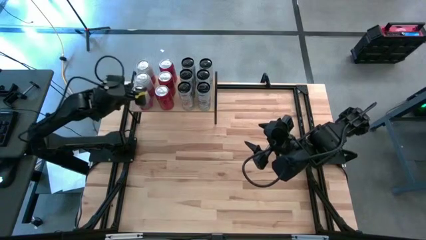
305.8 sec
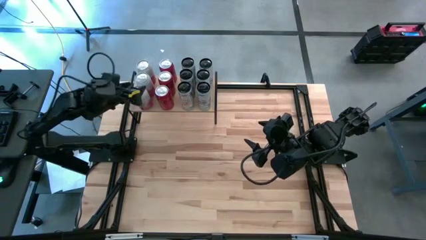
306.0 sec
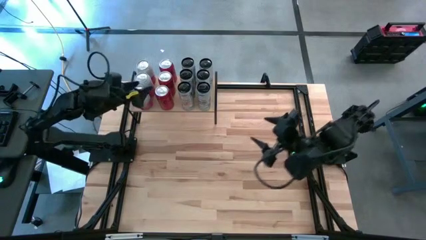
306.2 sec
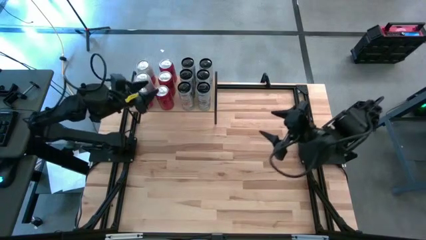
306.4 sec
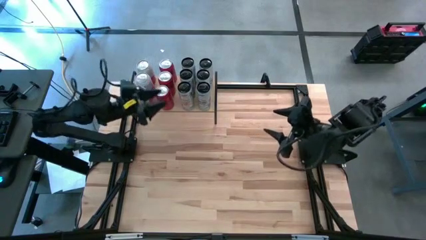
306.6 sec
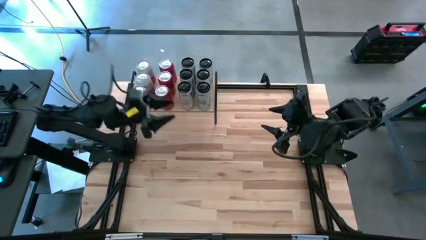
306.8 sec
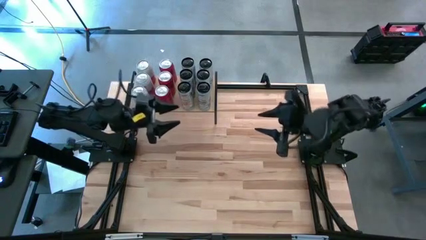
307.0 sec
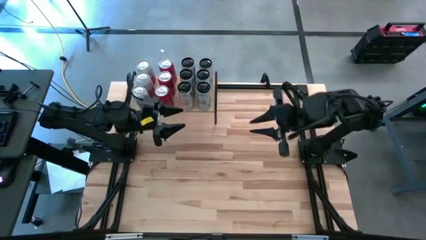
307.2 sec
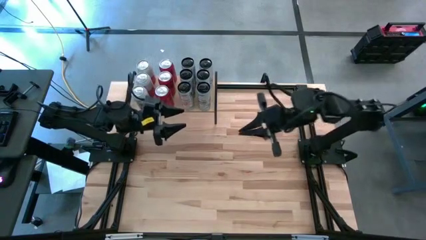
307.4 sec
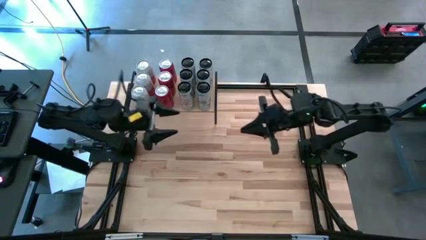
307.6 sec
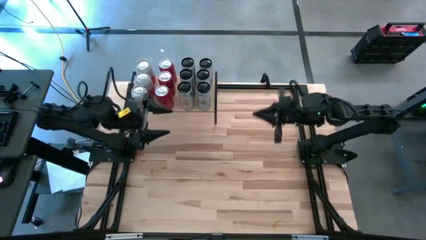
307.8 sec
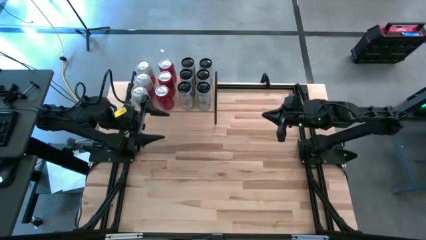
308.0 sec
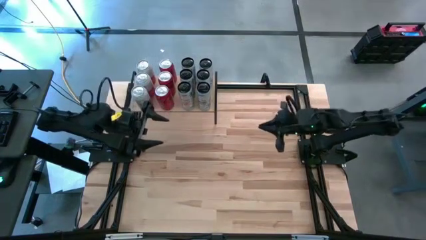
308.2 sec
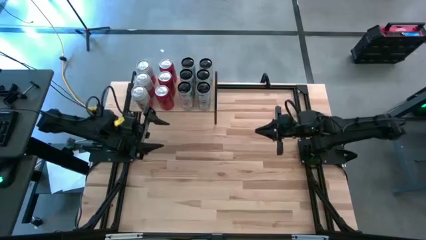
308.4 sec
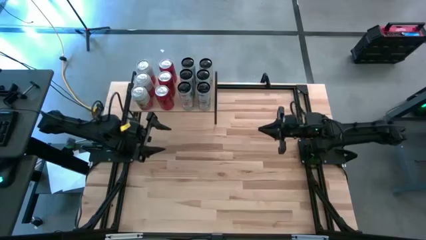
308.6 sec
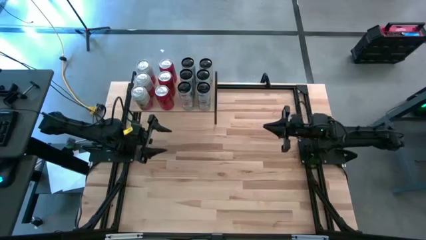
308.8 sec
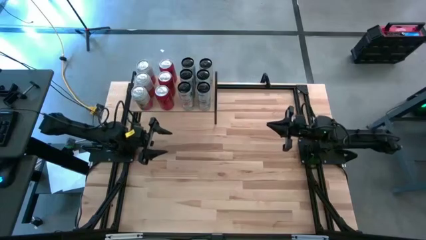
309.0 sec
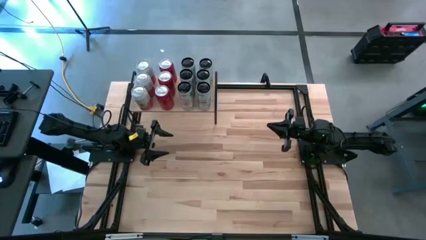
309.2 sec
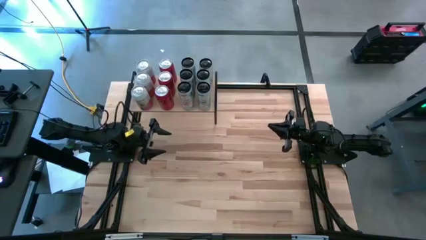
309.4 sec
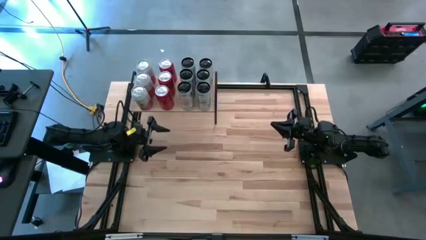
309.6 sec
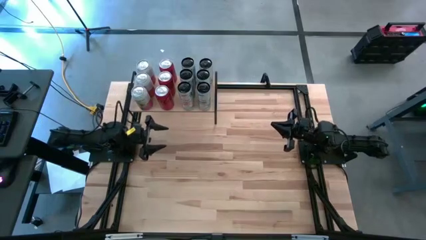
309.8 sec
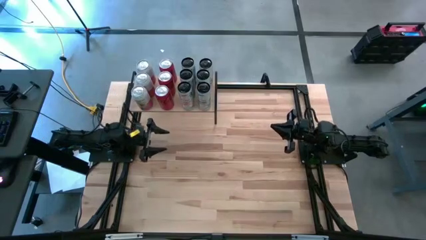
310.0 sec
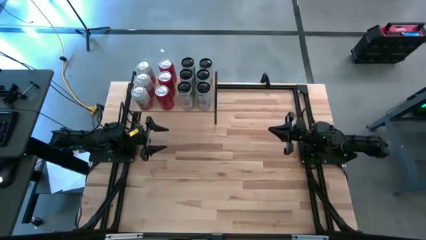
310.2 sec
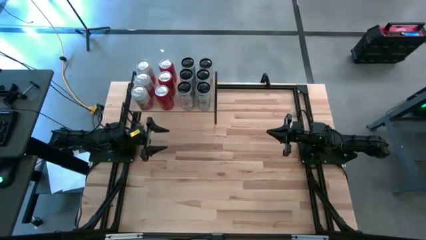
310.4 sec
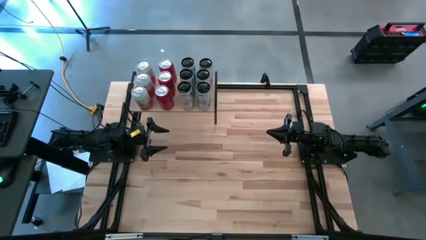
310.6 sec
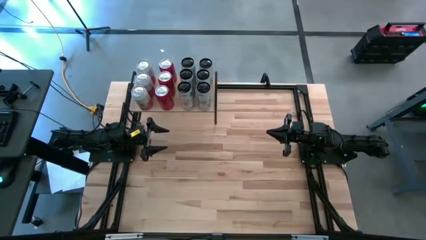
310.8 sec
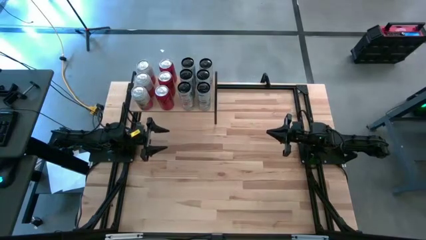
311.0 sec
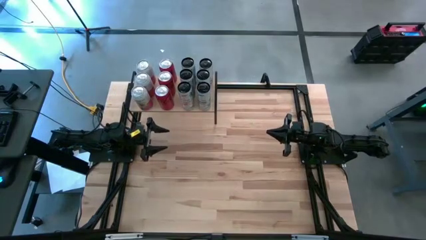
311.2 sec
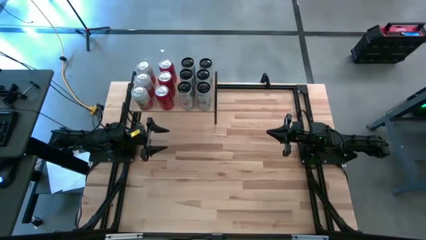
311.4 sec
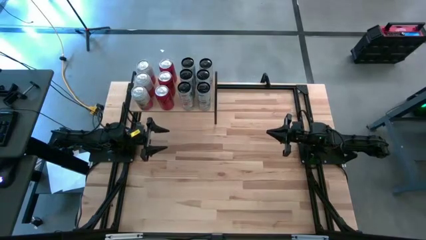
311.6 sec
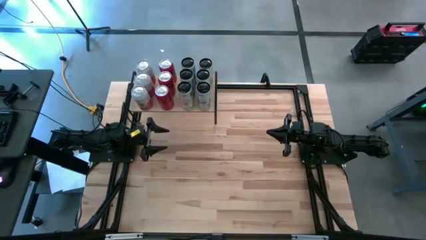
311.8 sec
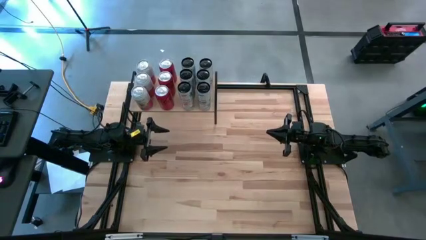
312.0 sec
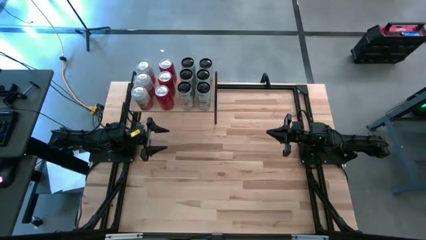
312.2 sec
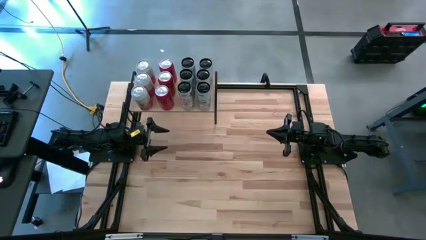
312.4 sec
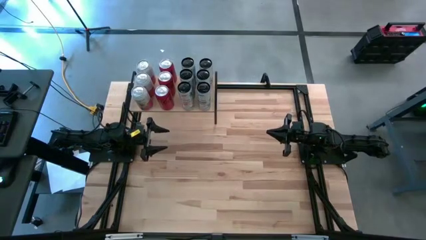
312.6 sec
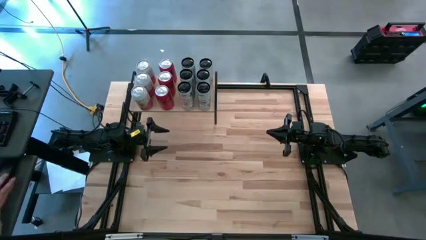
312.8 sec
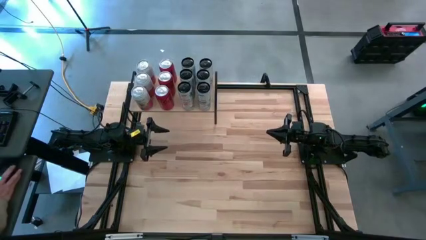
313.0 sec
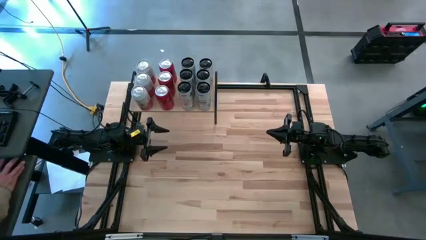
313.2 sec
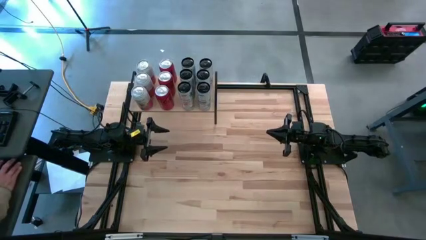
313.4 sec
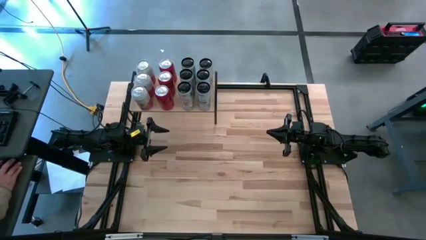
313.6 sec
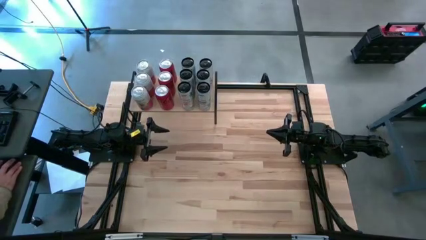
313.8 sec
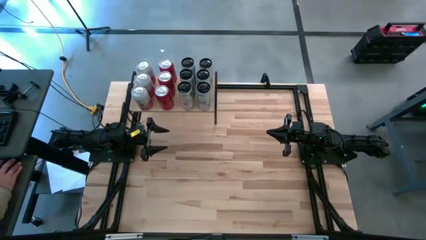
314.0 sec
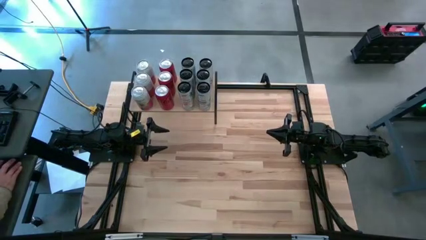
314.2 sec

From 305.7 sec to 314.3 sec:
Task: Place canned beverage on shelf
Return to Home Position

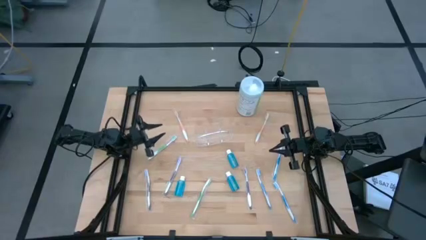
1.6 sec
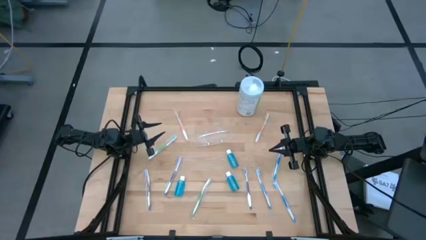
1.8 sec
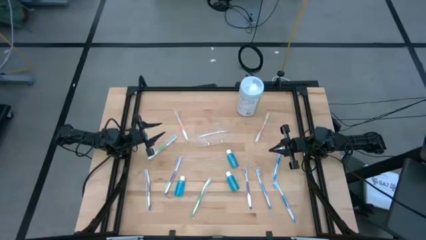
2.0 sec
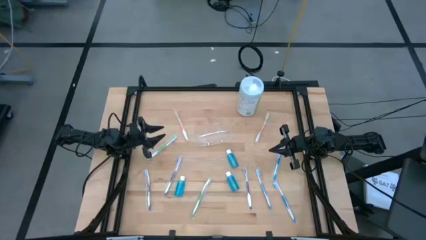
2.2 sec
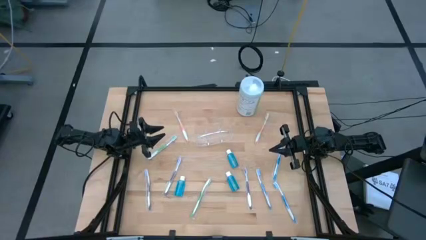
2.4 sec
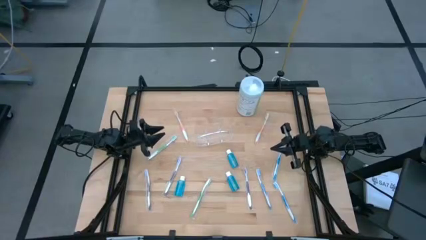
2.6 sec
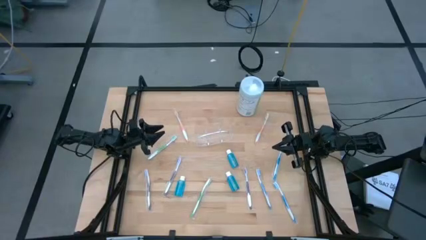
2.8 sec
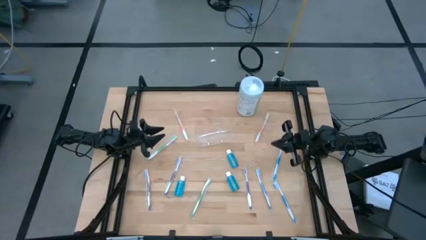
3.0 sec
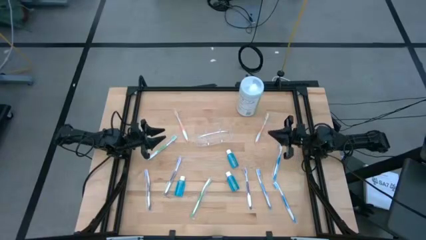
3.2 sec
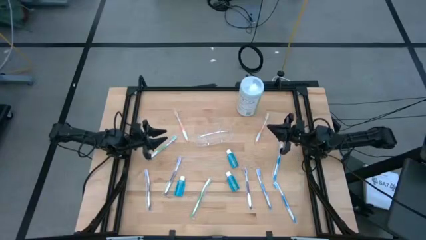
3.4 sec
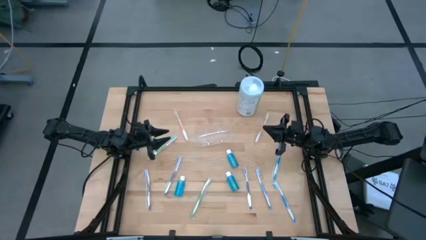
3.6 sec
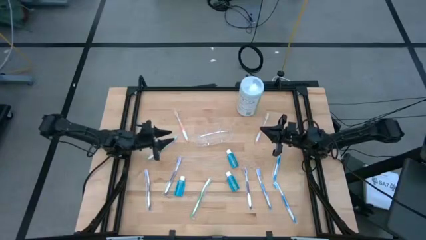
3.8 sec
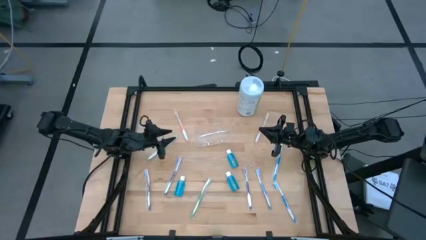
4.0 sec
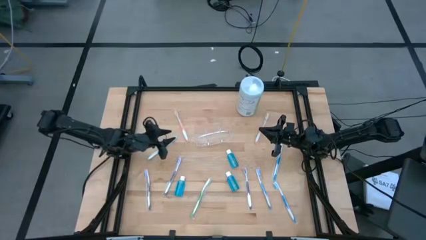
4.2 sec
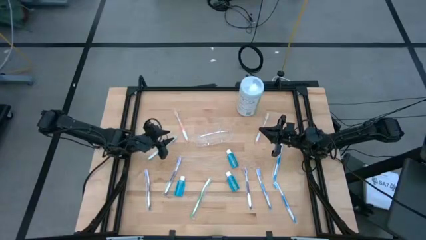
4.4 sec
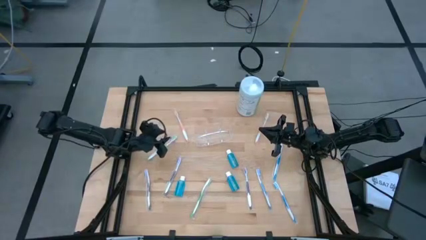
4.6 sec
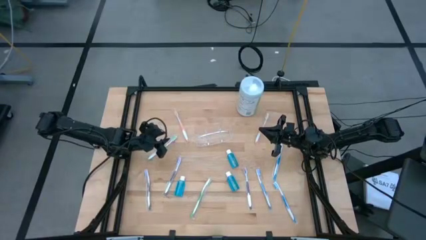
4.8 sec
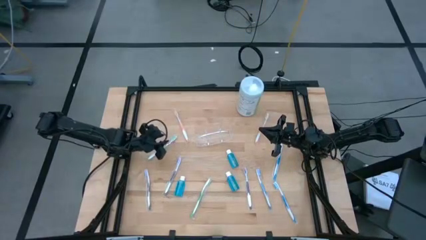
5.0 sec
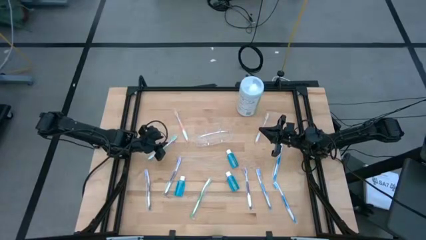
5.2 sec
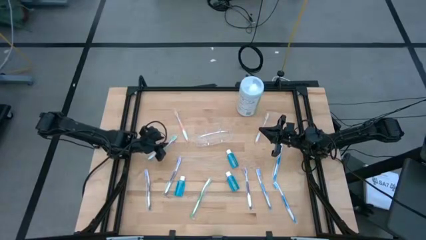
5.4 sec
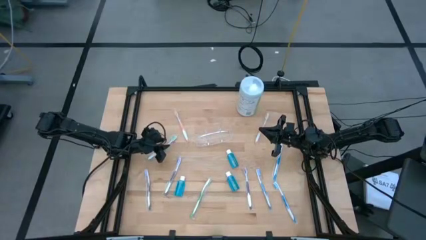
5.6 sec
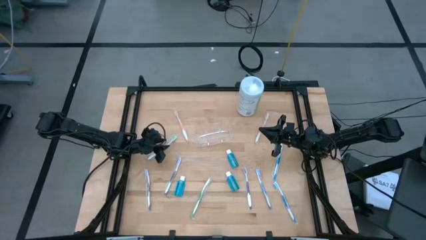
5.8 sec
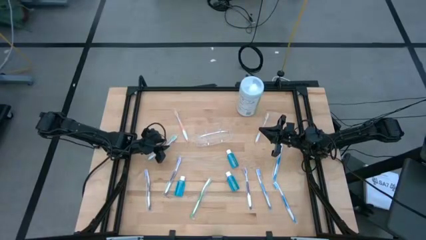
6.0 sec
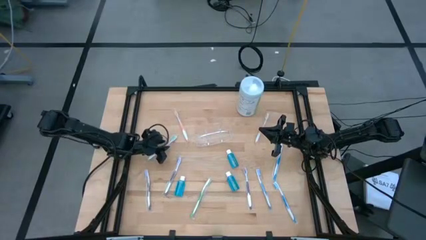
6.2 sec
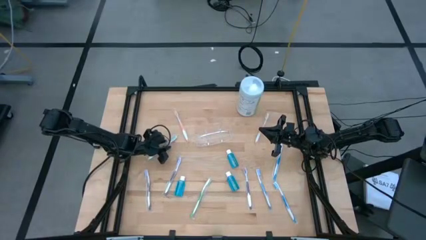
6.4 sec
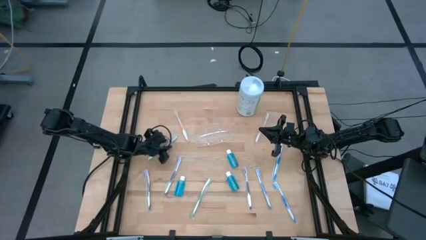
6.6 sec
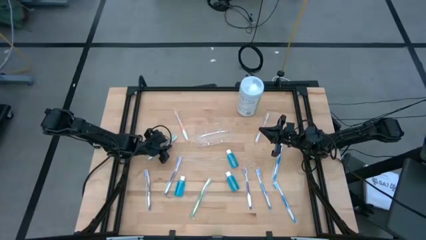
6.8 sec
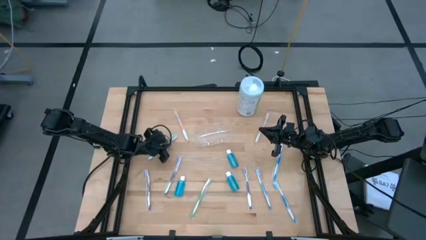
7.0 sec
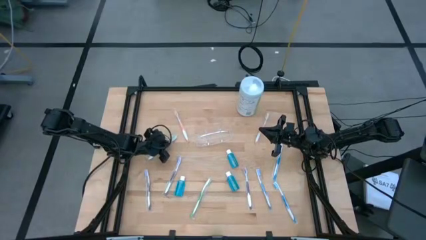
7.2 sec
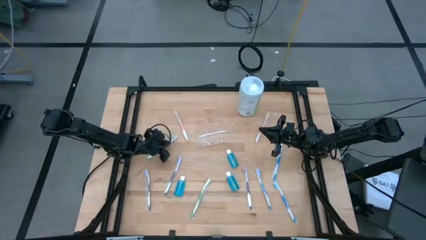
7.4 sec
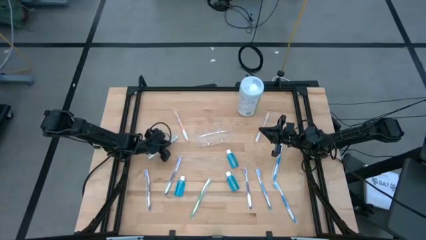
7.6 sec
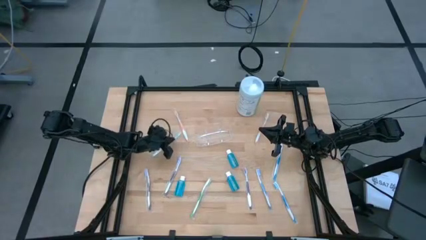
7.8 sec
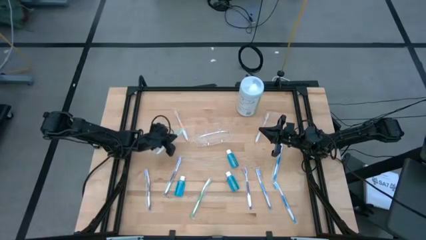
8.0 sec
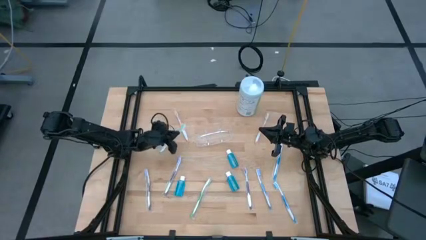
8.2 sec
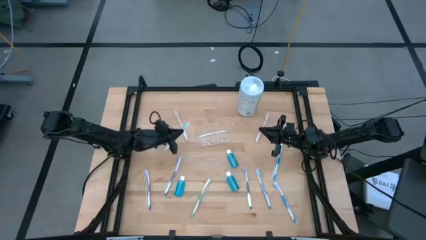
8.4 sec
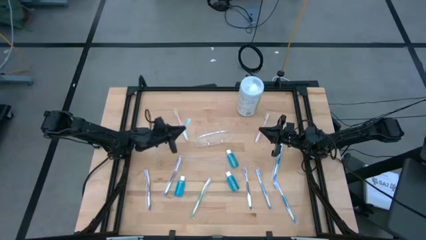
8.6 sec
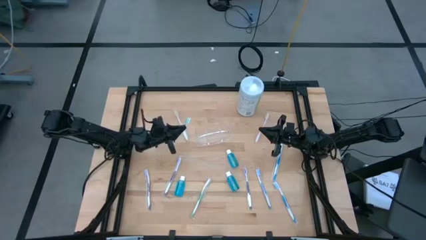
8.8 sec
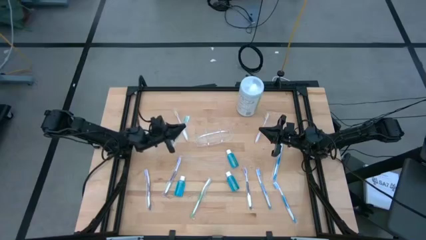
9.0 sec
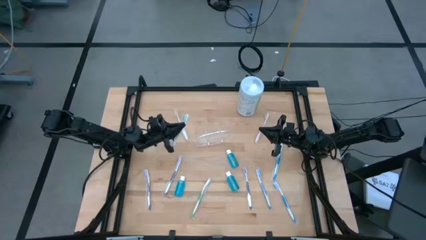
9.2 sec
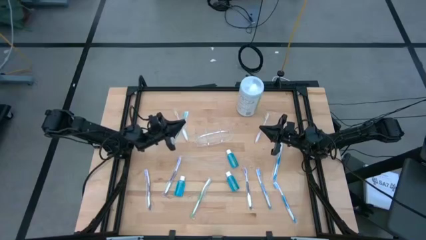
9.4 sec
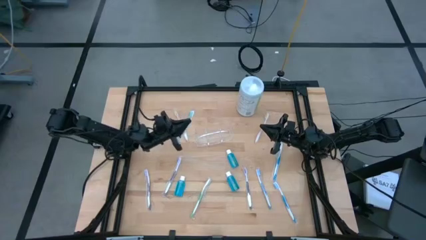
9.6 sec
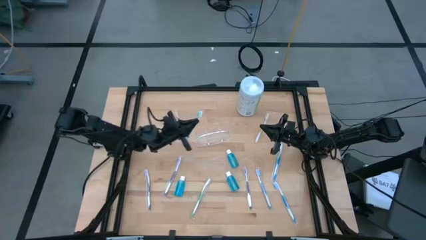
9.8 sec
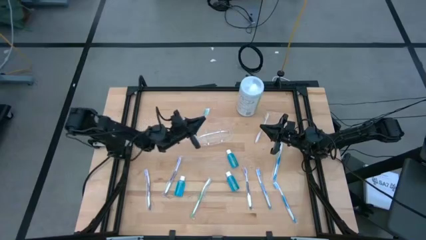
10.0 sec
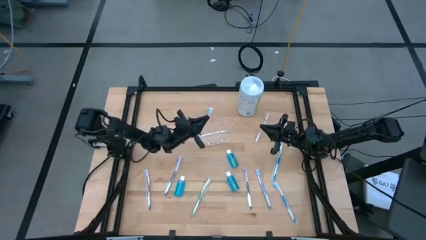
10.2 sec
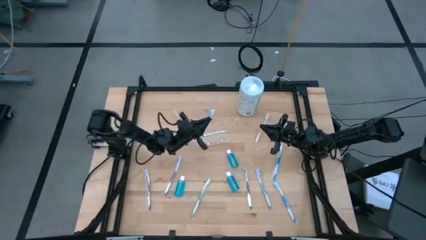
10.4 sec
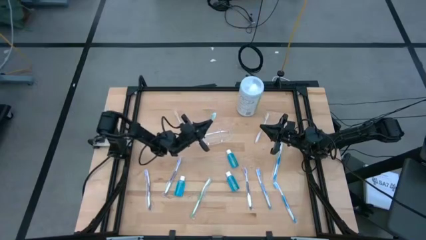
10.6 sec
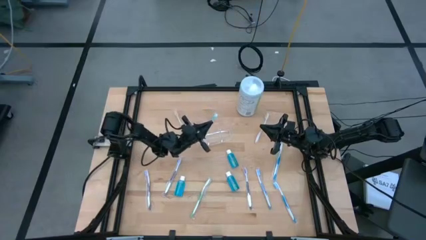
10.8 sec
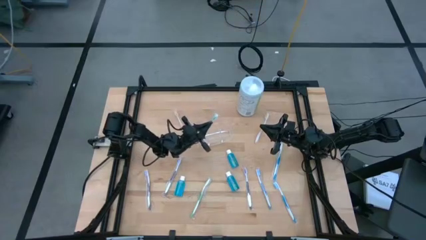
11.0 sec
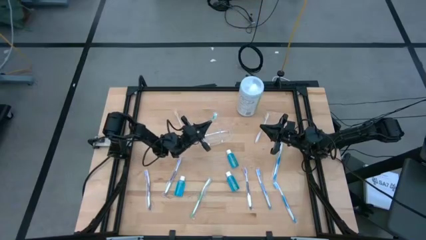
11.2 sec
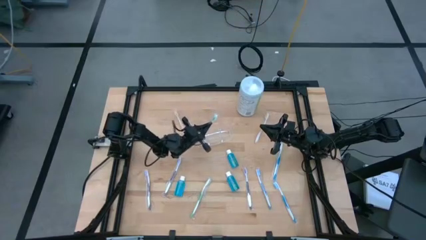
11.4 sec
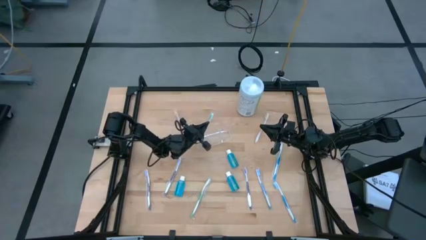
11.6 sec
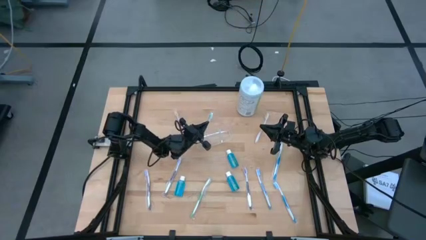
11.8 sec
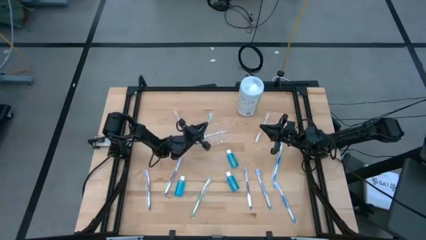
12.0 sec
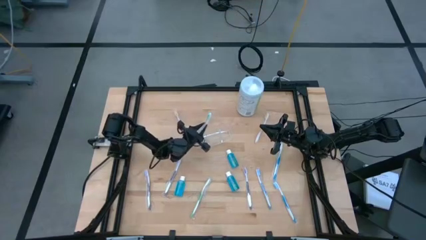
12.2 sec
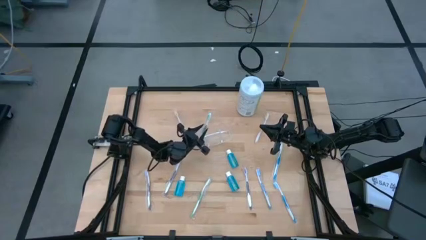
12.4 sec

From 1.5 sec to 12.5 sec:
Task: Pick & Place toothbrushing station
Put the top green toothbrush into the transparent organizer
